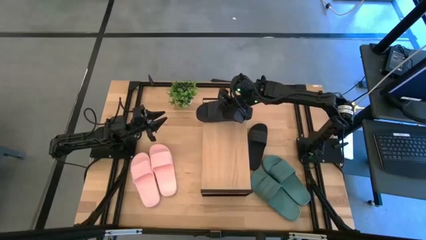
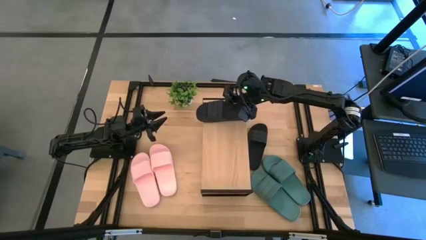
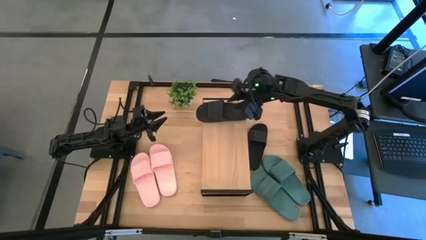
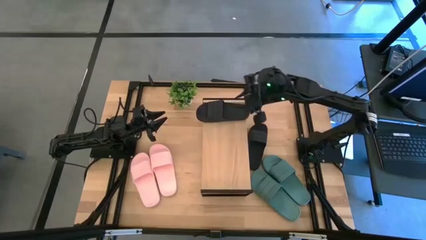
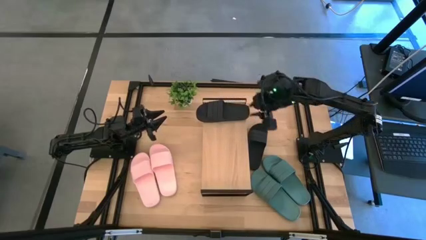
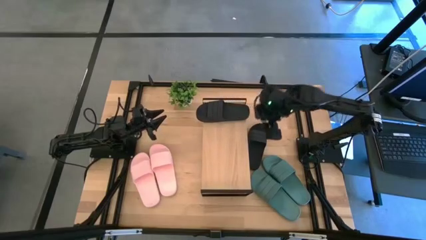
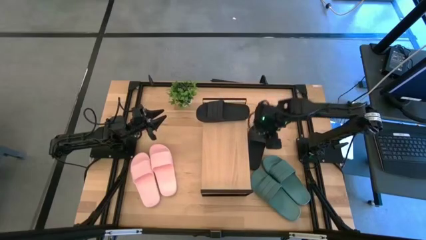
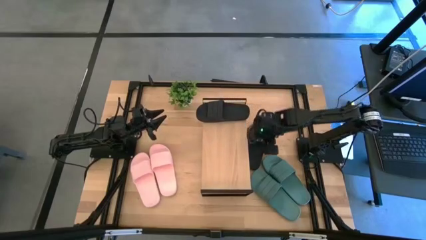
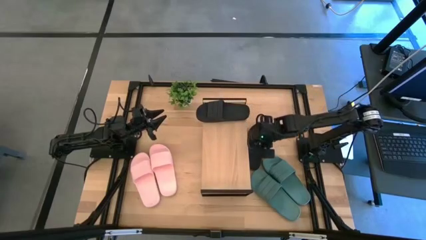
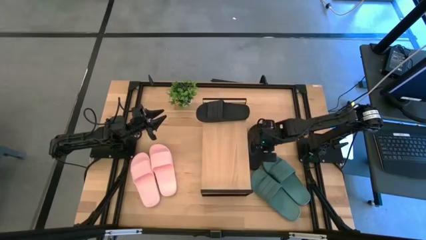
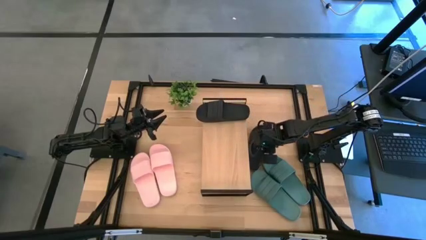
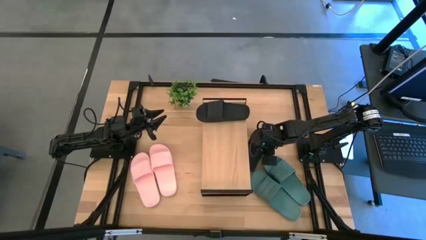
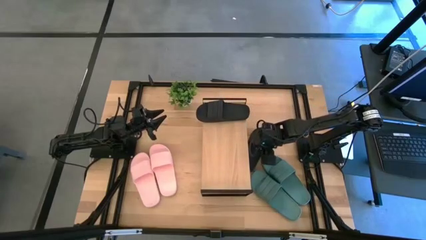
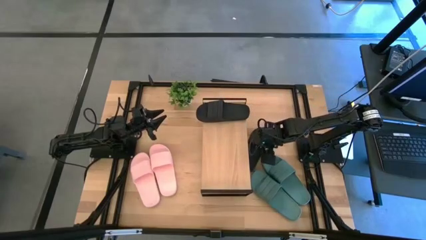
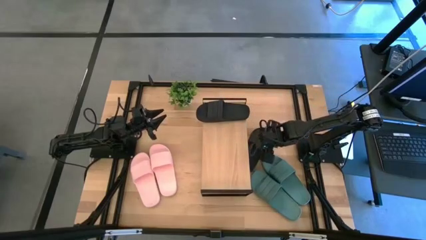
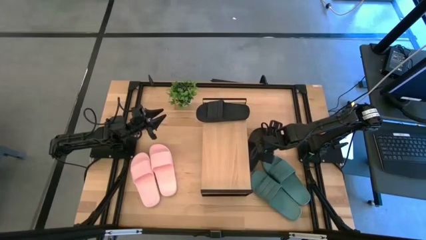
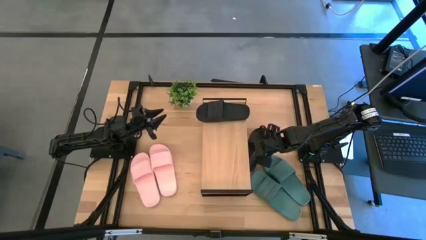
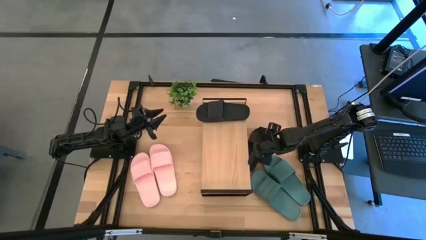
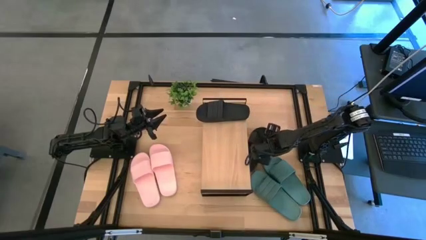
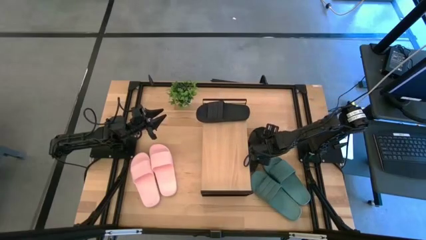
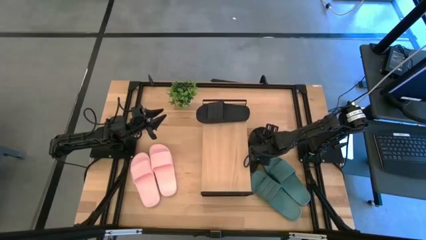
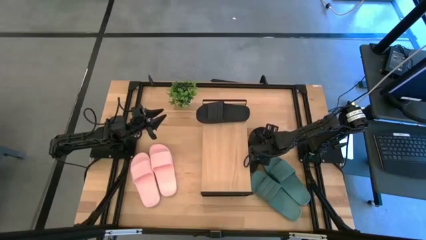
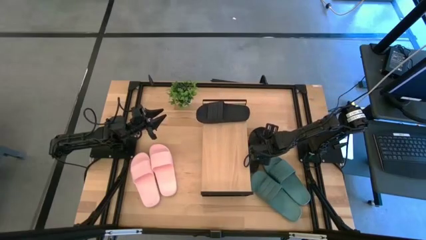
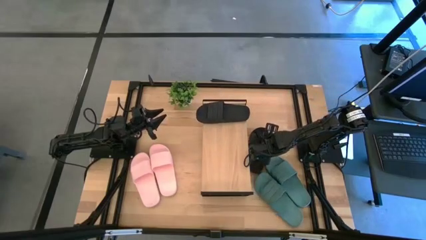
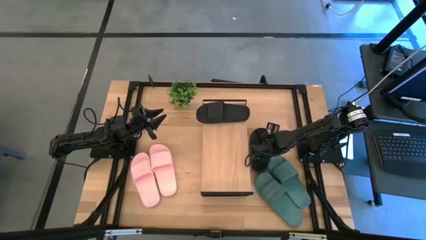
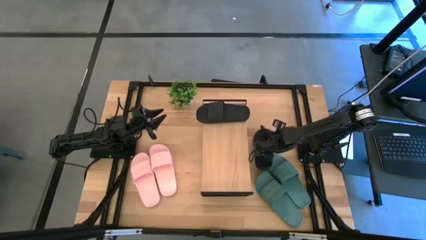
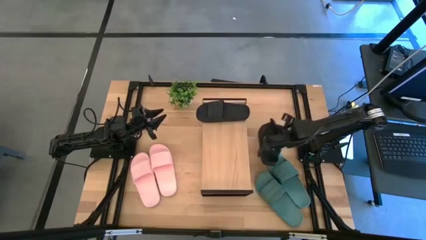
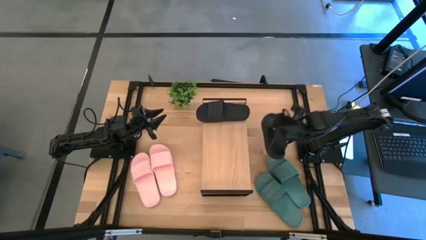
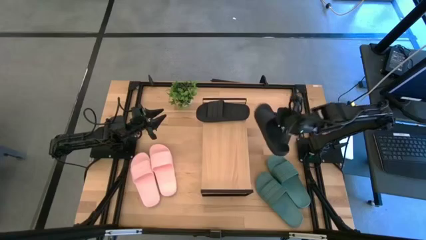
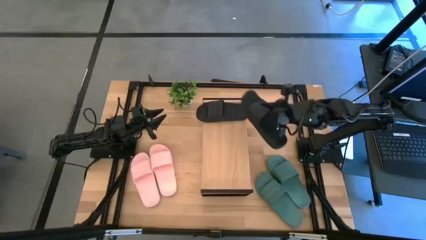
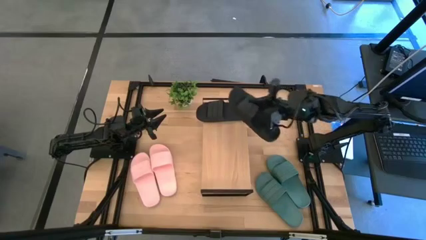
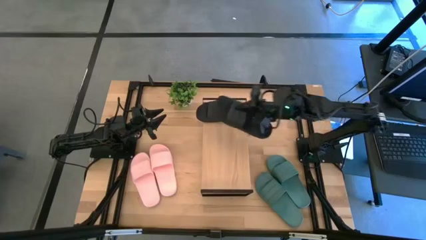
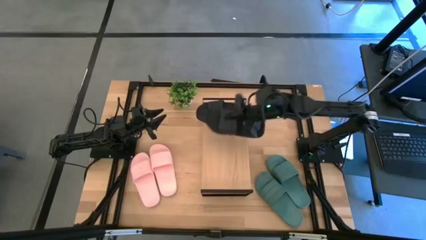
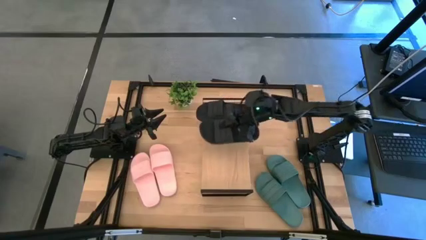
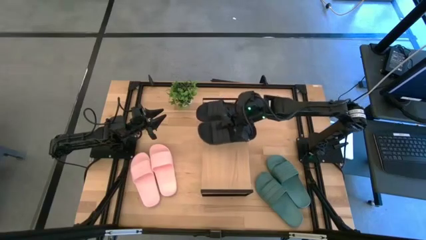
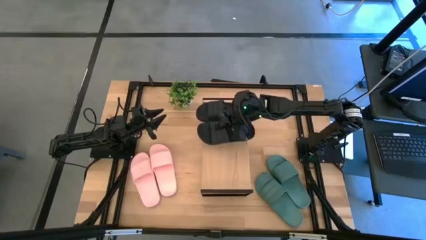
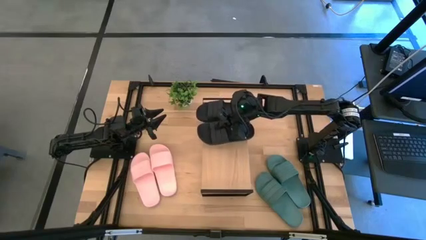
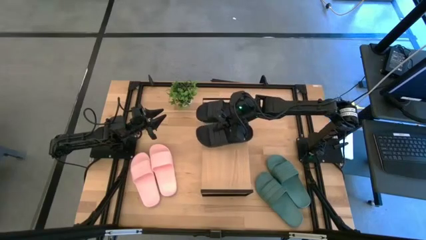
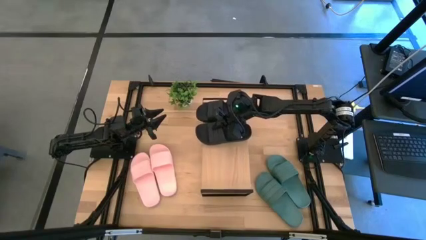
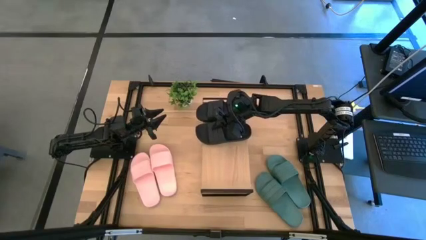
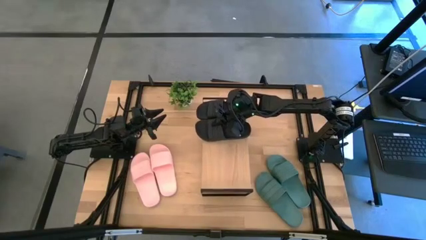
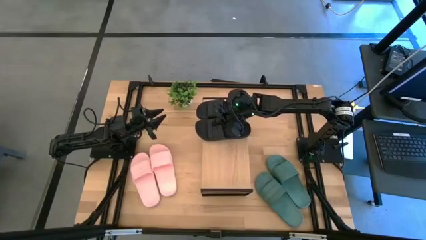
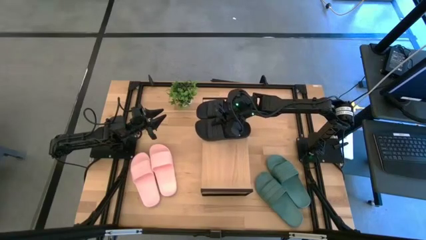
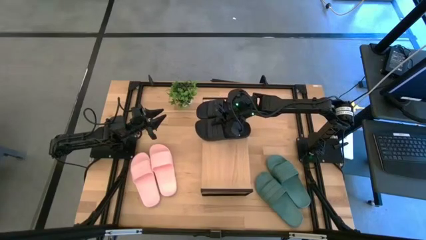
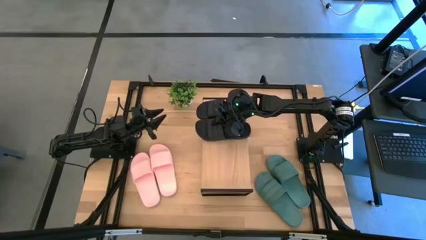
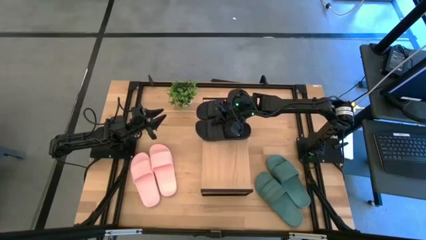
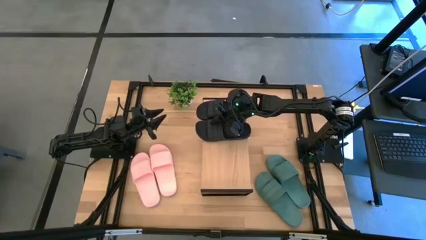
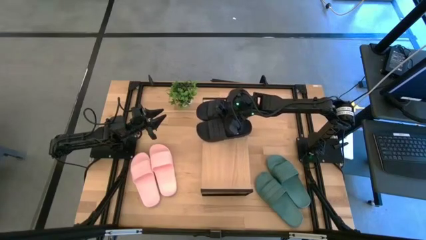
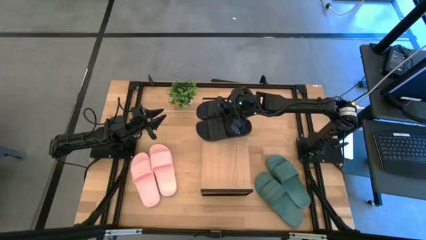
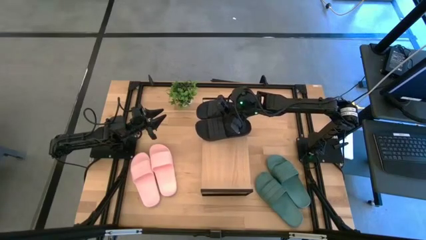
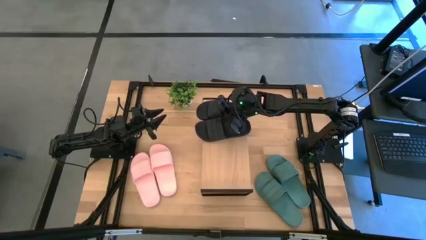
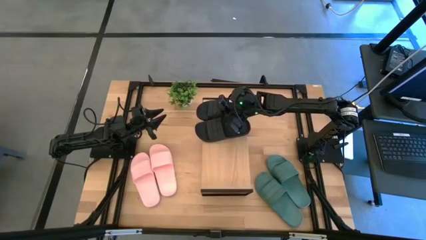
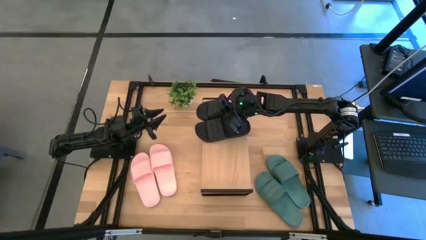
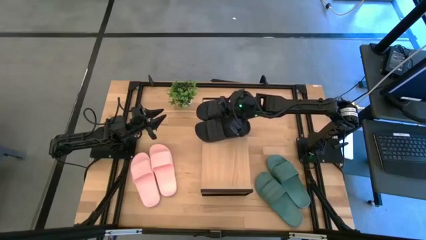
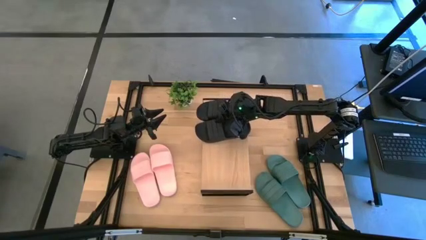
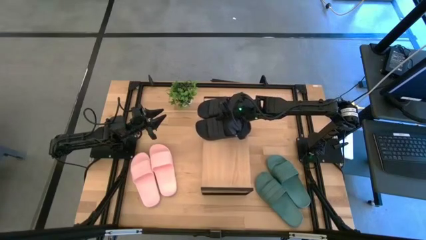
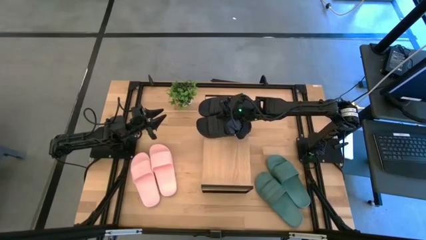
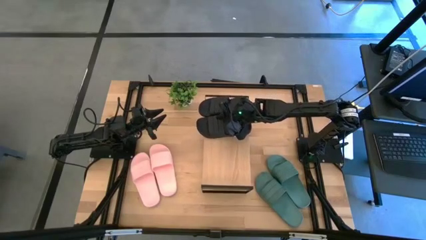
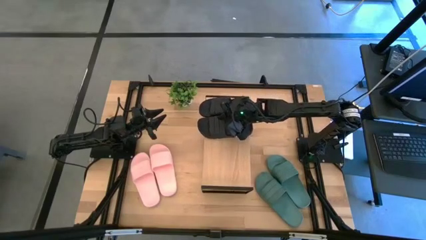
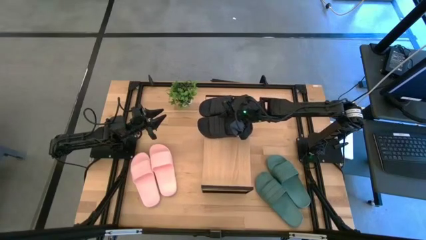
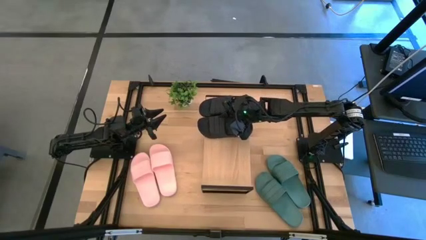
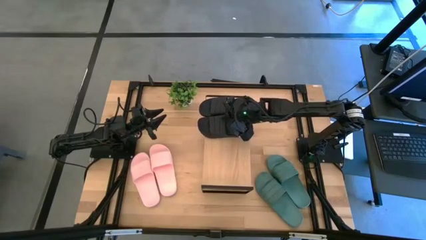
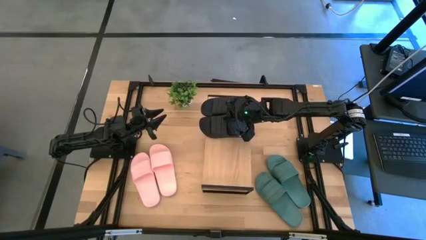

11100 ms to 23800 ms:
Task: Pick and place slides into the shelf
Put the black slide on the shelf

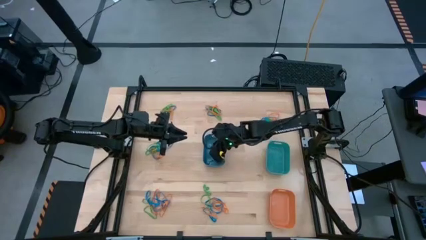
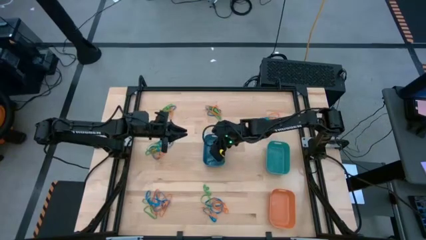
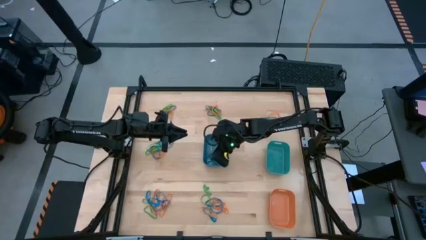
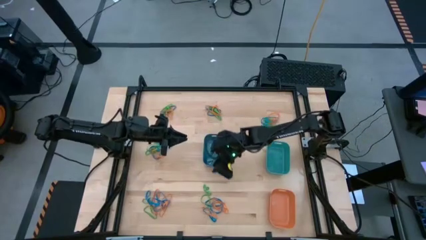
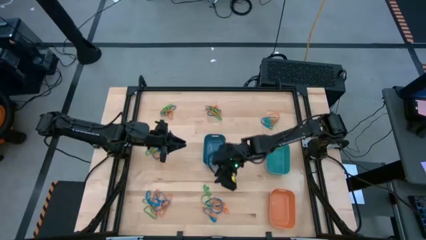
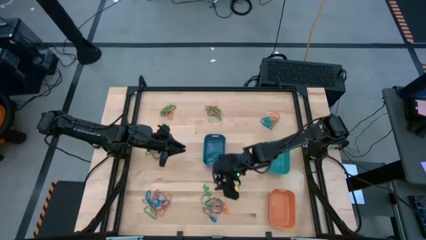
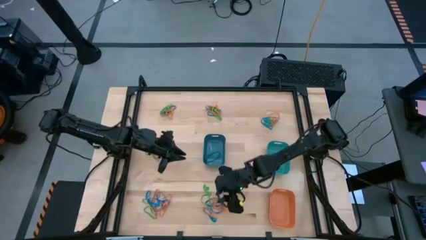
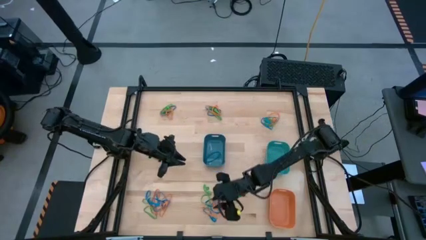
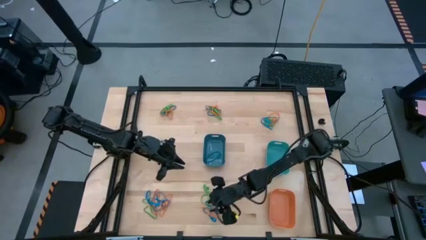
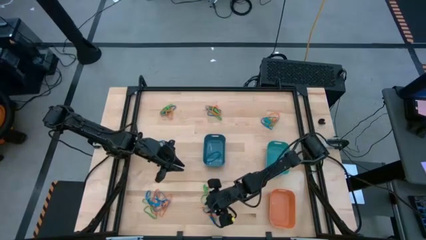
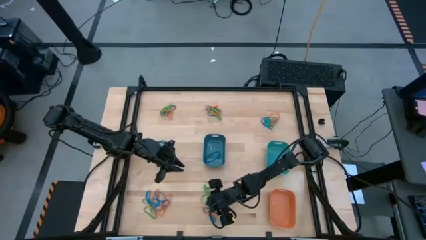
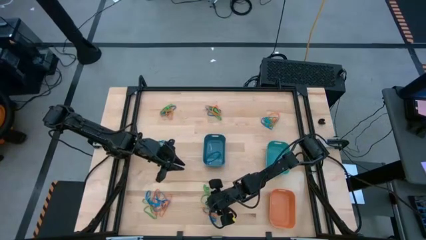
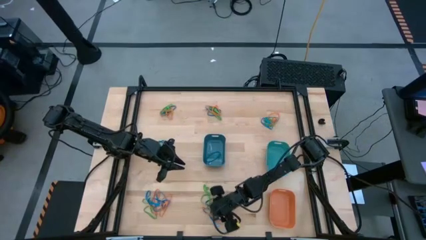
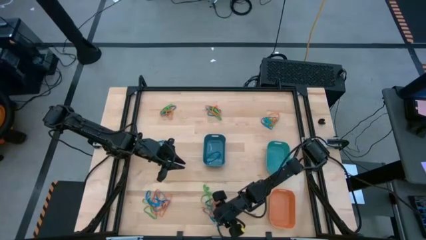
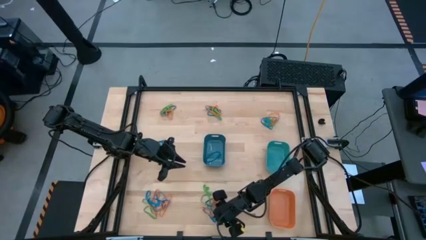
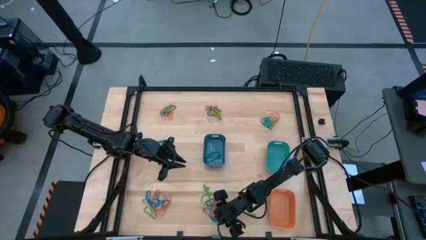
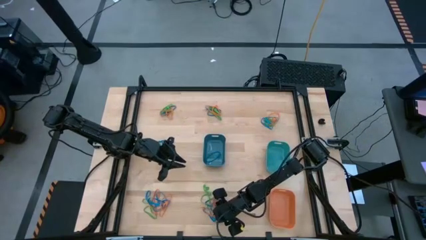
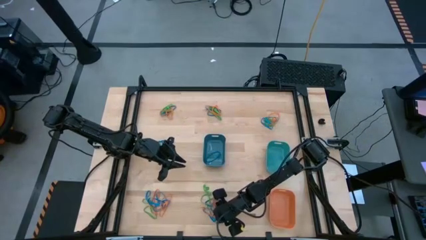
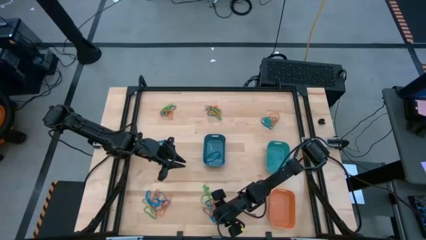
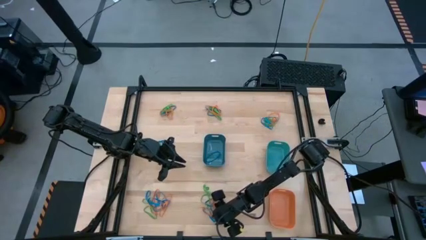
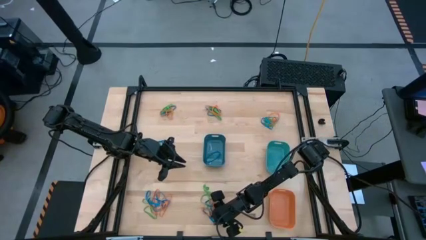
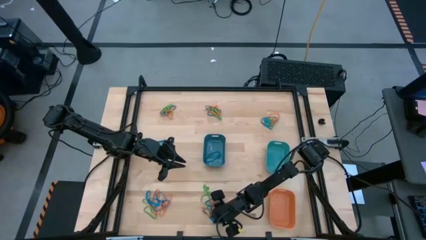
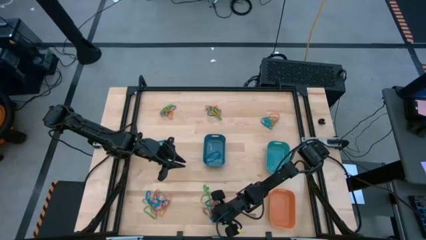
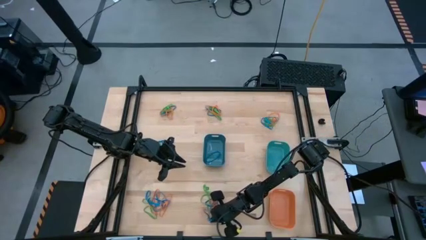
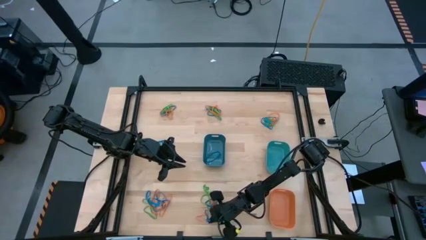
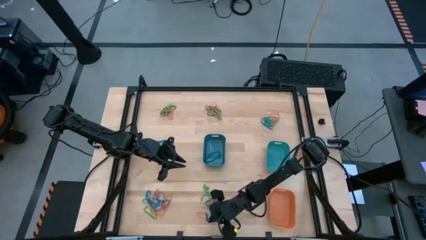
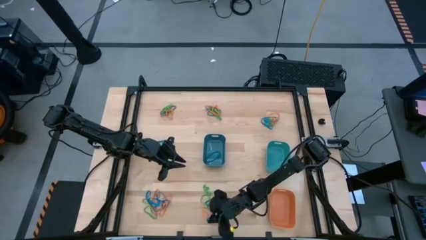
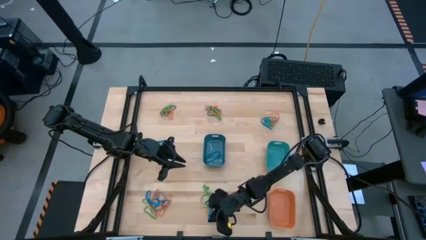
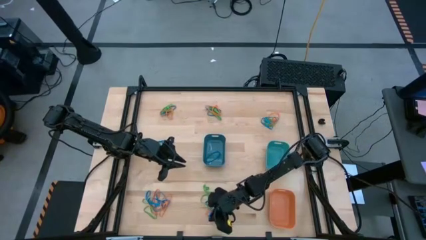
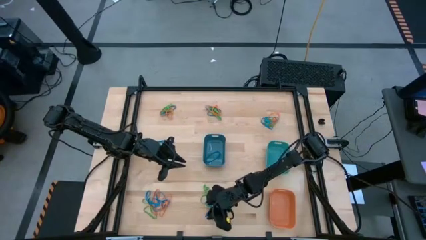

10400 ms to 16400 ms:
Task: Sort rubber bands into baskets
Put the blue rubberband into the blue bin
